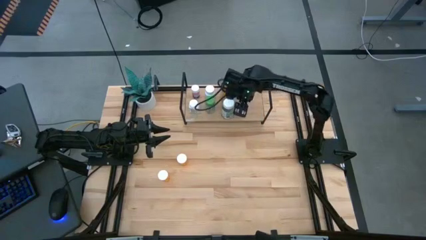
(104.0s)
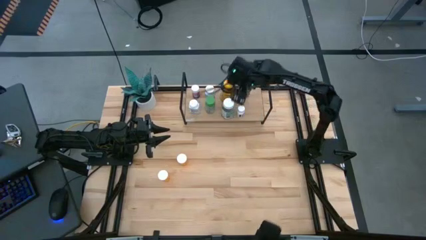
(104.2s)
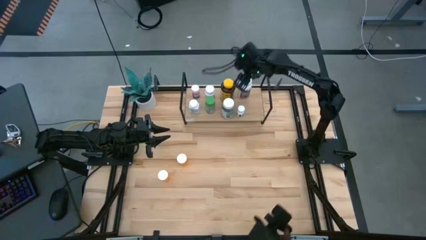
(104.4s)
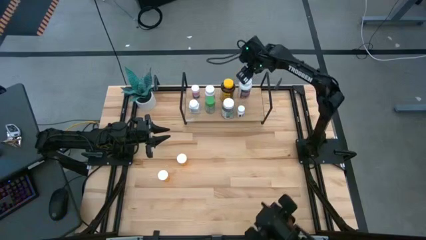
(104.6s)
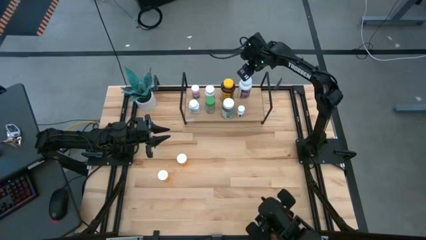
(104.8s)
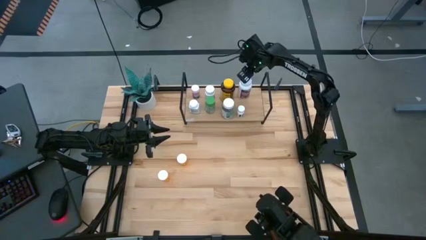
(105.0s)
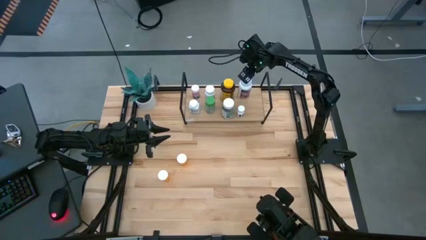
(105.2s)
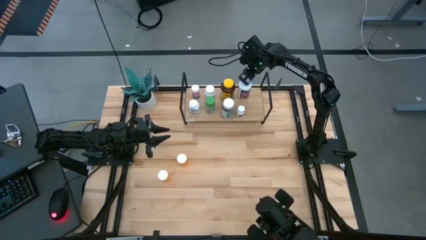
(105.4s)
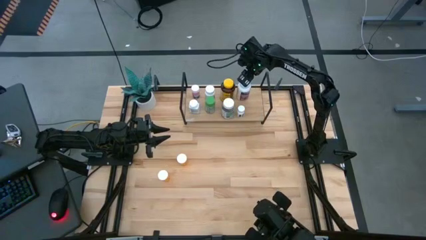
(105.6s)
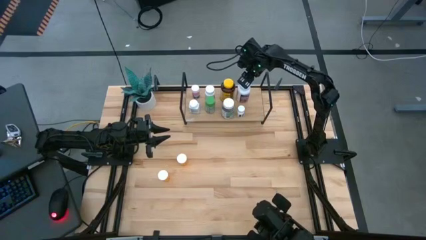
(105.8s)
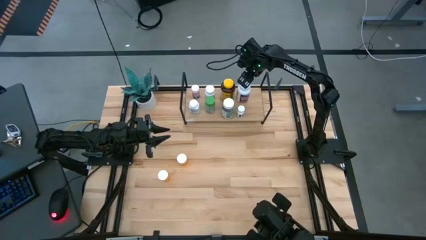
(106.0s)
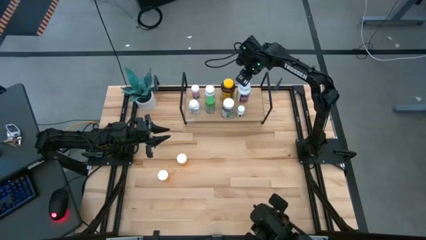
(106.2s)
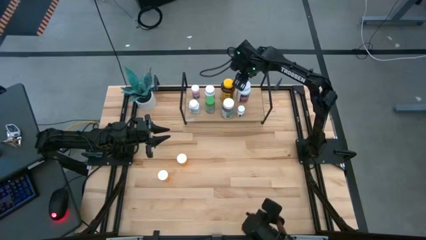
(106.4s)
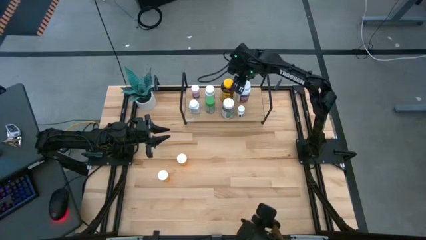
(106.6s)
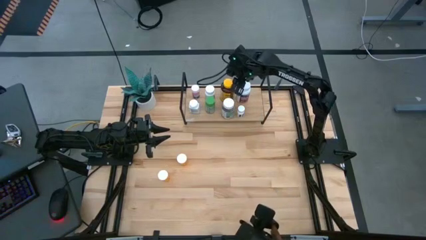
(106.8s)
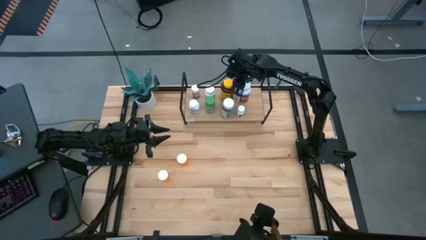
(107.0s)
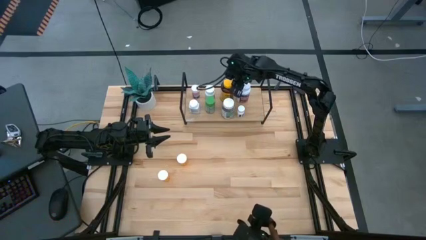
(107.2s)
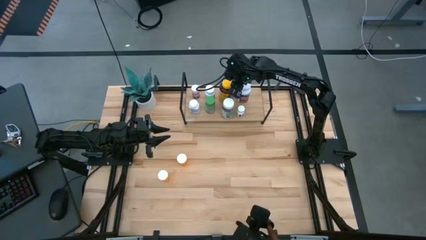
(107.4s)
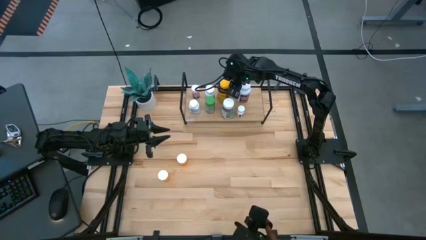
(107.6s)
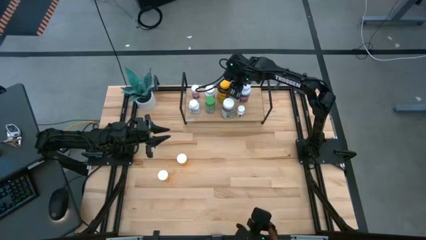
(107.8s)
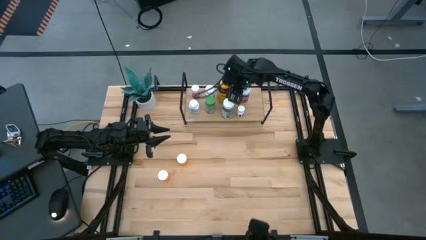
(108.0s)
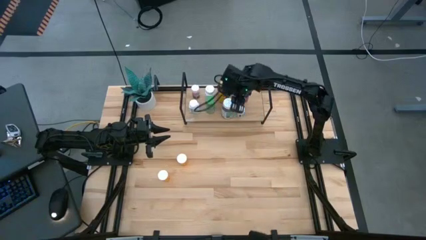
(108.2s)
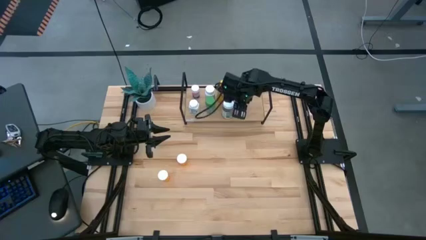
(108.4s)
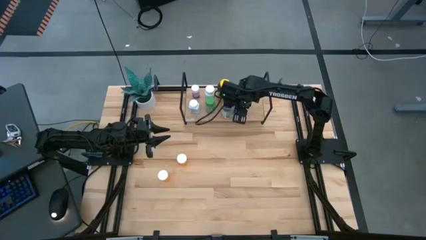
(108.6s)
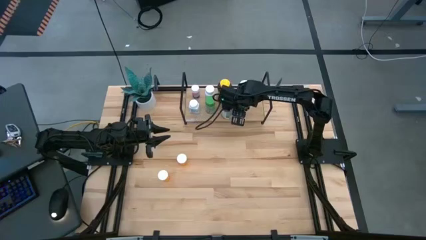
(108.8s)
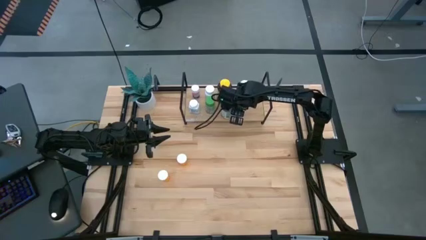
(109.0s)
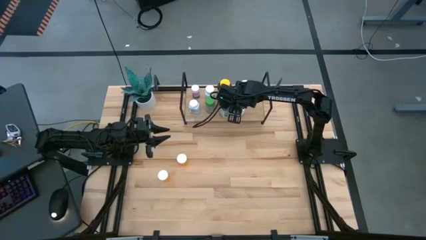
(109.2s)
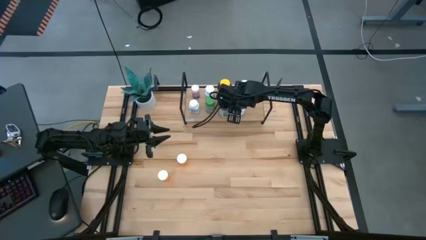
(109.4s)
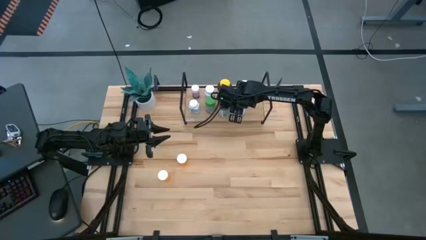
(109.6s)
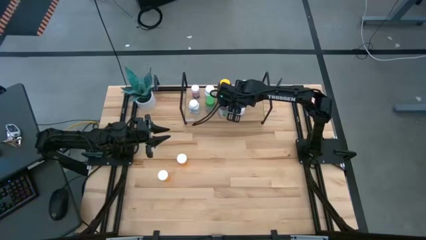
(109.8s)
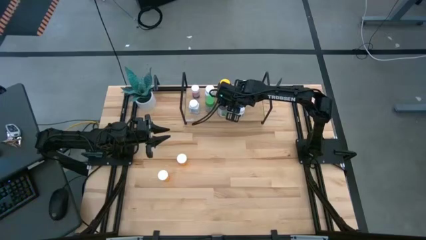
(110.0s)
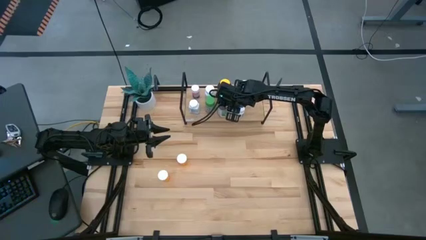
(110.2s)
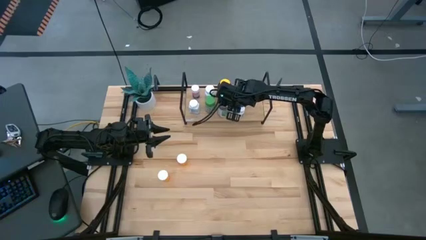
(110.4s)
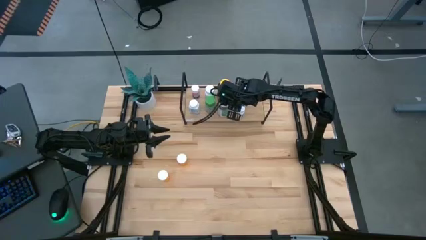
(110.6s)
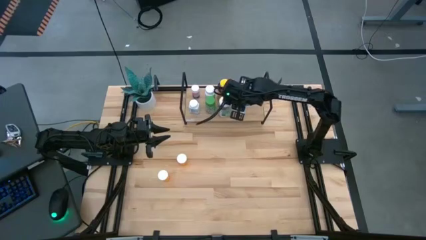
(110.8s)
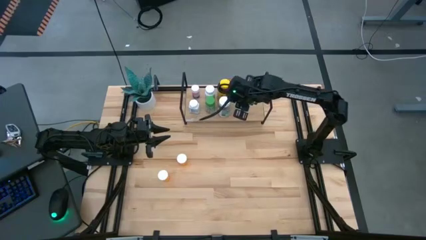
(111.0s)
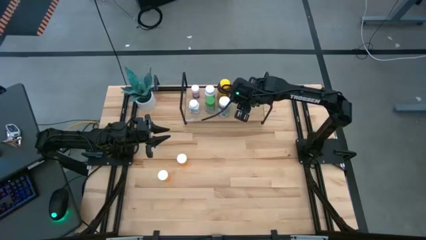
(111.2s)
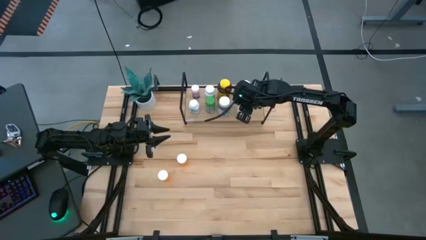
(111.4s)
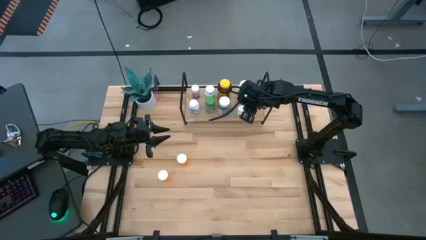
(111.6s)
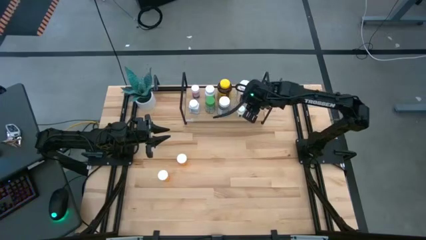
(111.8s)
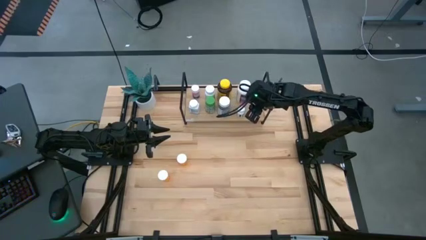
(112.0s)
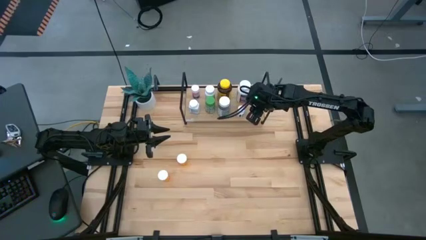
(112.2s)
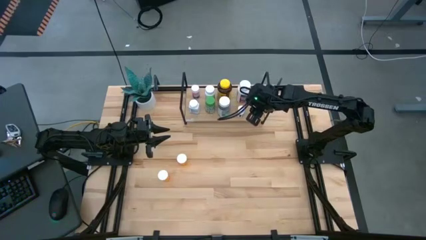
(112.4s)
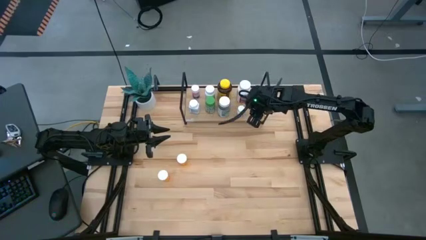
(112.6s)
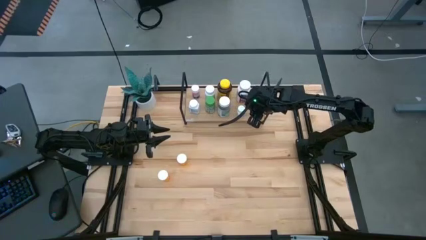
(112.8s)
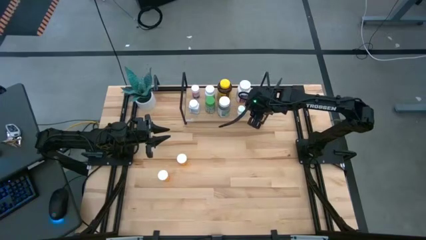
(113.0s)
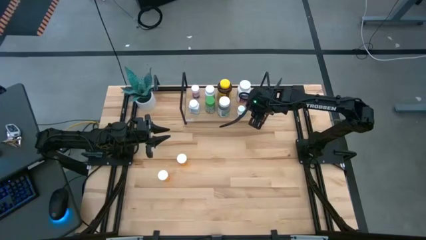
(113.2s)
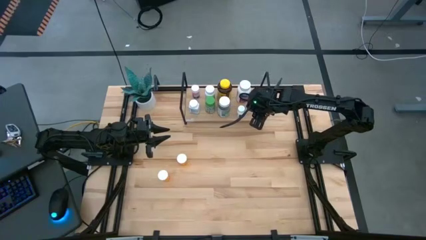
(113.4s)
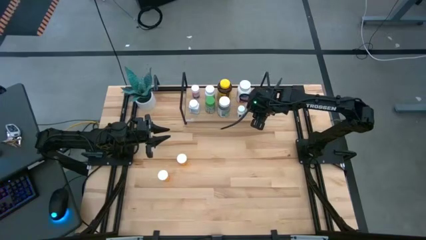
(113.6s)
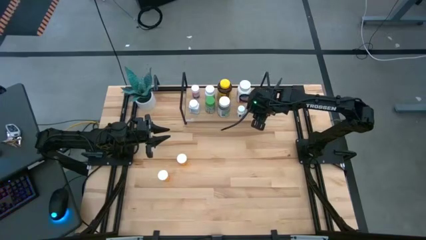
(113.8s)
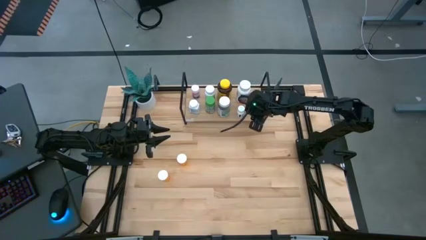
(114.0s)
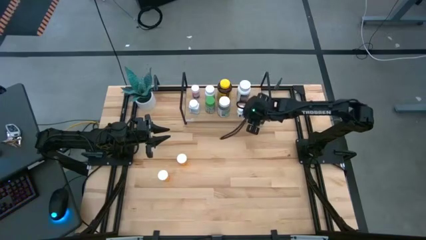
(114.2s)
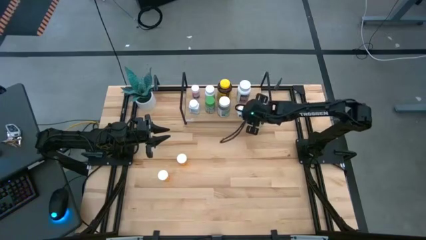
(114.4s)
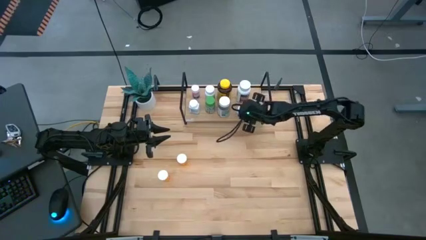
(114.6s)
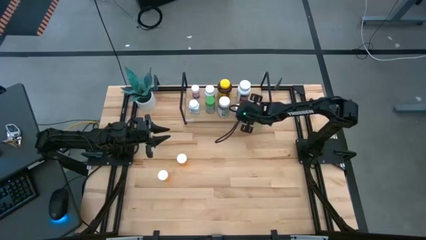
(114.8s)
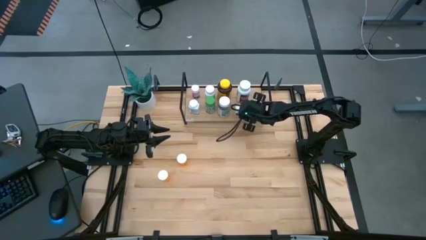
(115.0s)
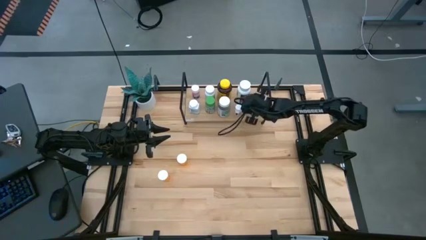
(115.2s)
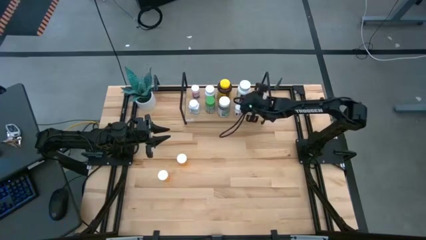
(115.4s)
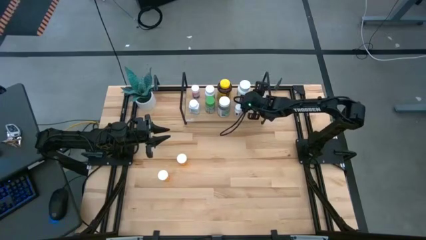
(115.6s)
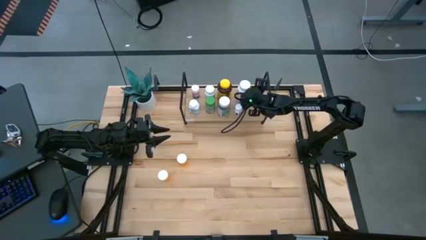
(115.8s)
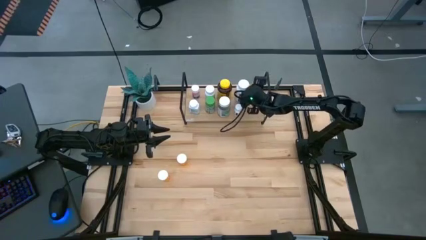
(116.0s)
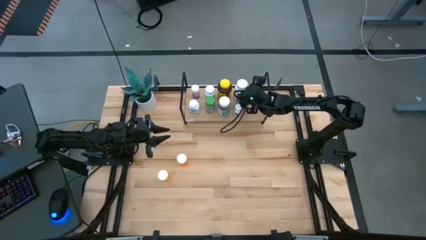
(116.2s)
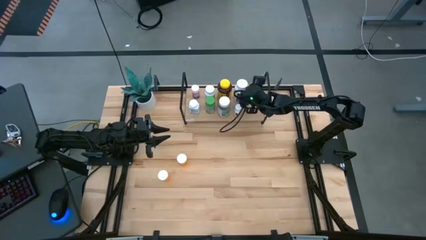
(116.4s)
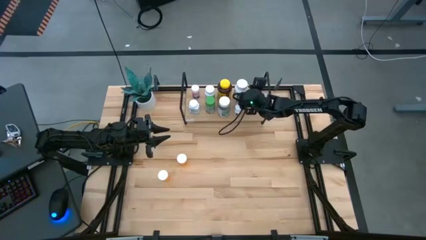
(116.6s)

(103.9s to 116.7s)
Task: Pick and place medicine bottles onto shelf by color
Adjust the pill bottles on the shelf

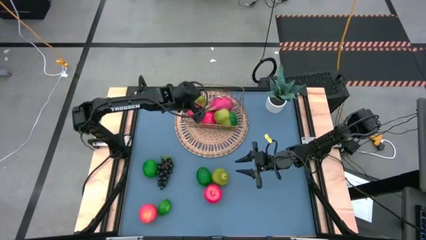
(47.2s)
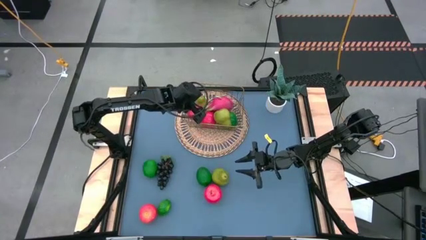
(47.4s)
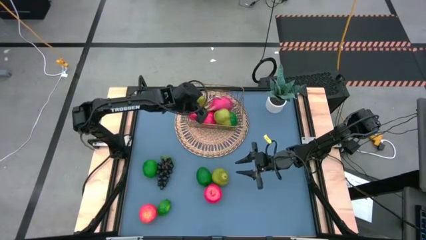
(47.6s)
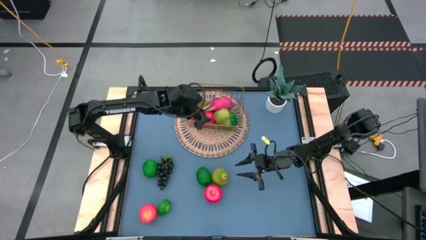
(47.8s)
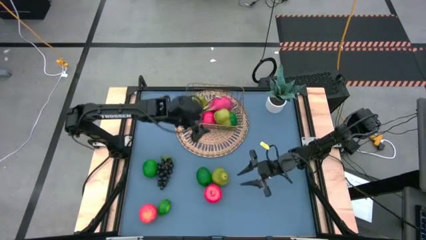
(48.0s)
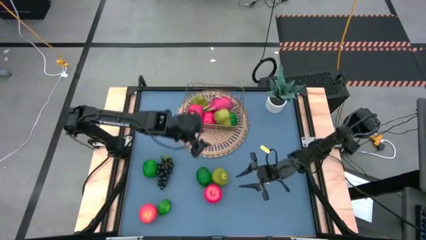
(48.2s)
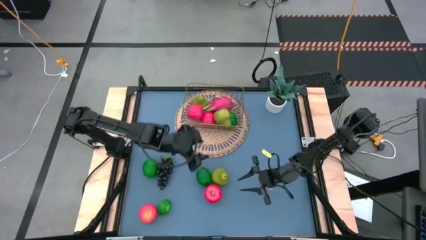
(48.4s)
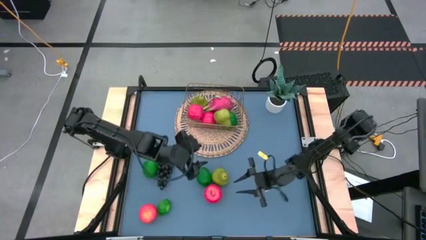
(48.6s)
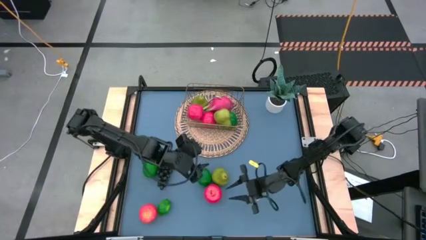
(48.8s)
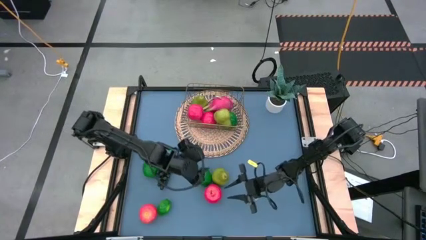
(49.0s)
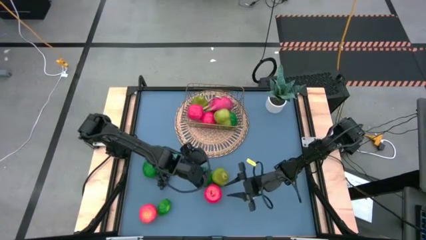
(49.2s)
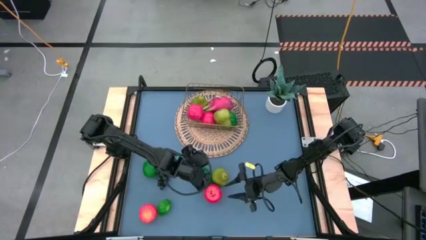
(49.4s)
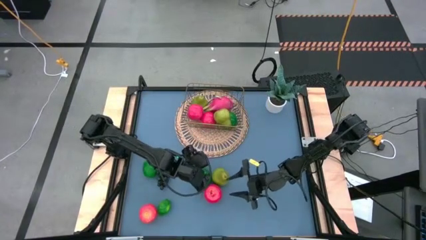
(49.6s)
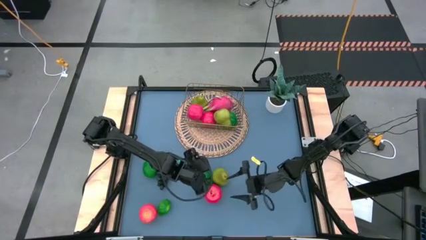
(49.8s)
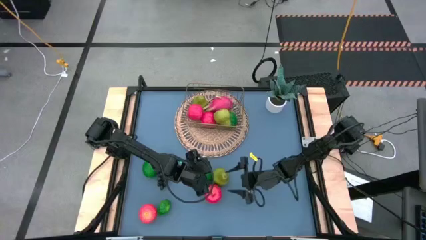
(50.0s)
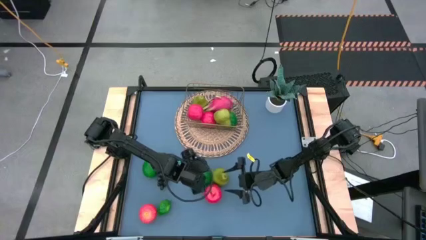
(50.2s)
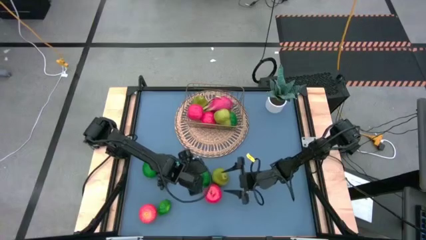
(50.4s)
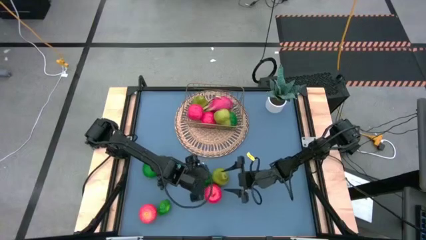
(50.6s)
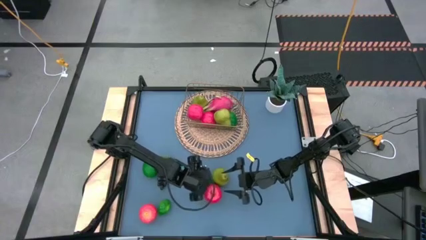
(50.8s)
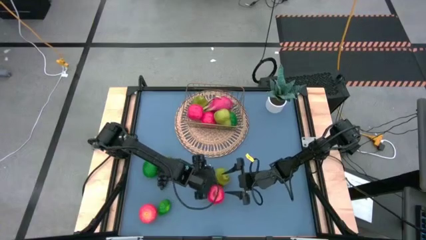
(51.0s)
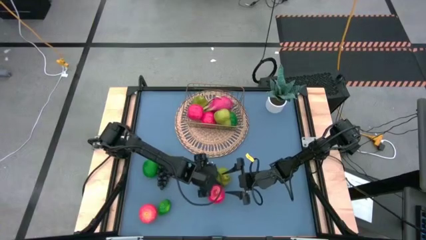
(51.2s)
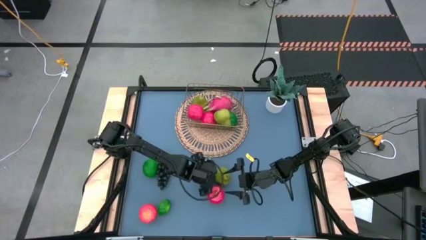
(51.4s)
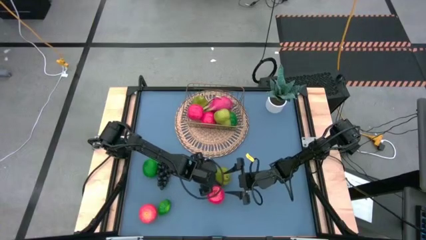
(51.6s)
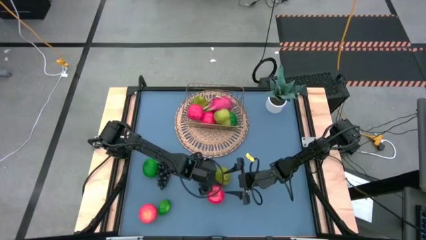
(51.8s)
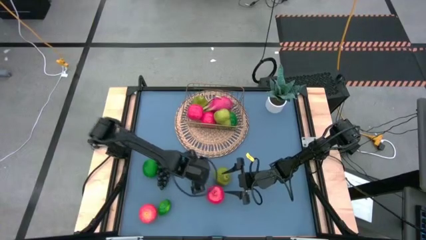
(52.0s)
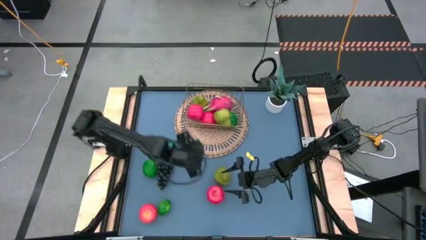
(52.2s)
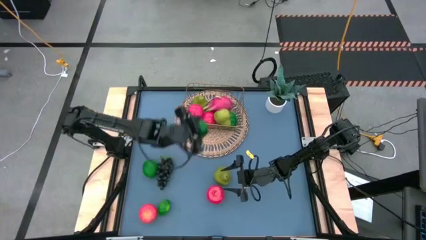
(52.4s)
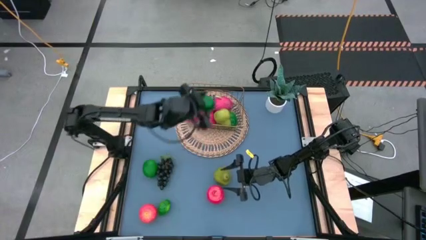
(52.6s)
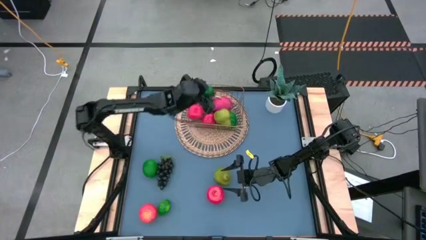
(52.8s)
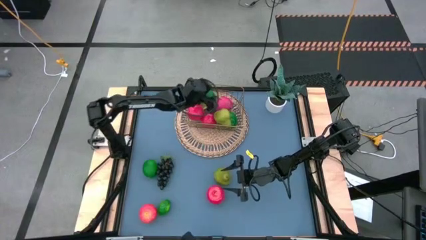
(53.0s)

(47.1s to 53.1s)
Task: Build produce basket
Put the green lime into the gold wire basket
